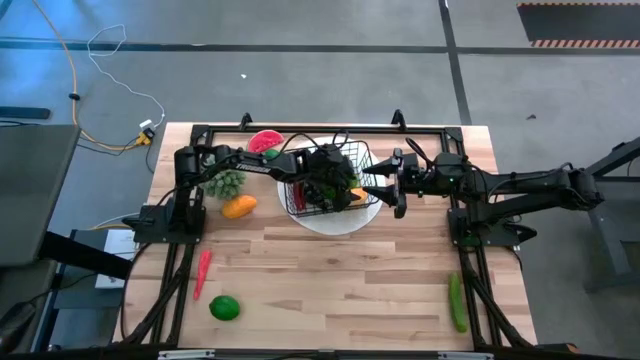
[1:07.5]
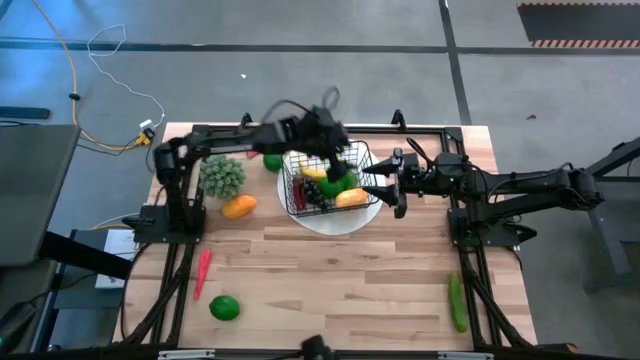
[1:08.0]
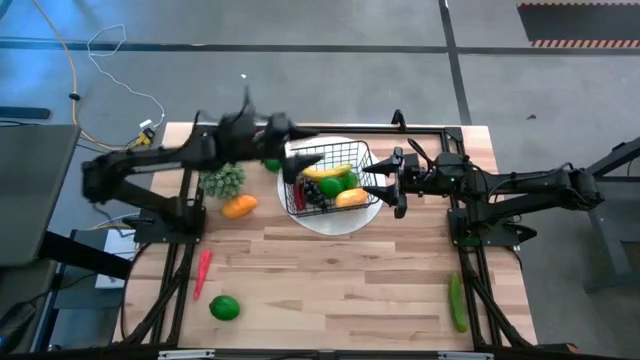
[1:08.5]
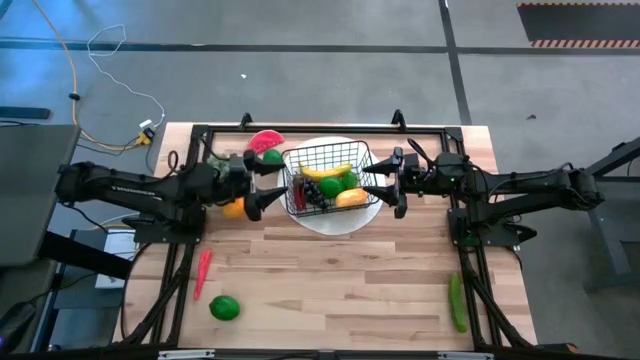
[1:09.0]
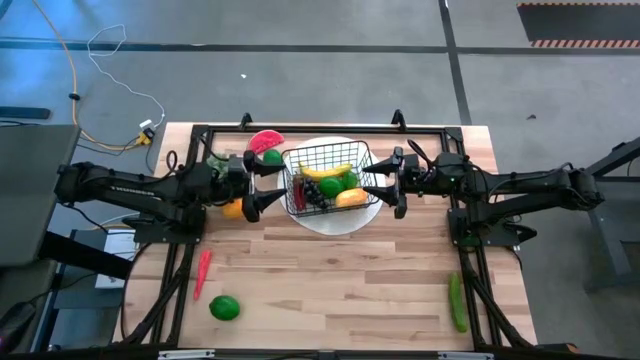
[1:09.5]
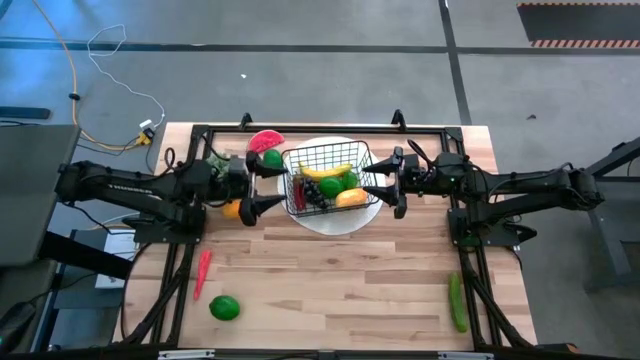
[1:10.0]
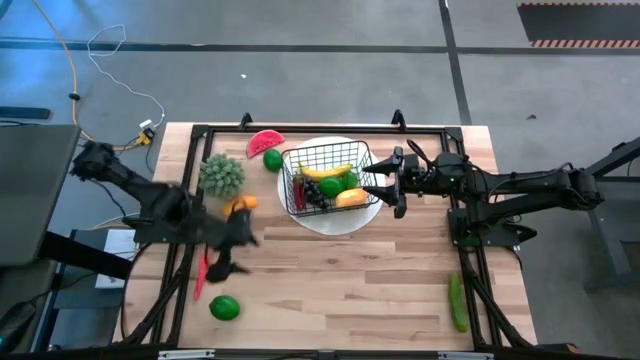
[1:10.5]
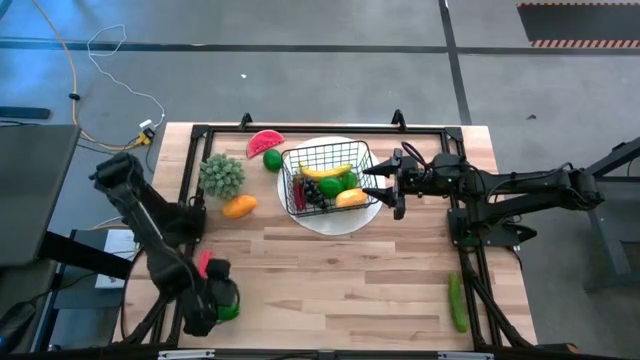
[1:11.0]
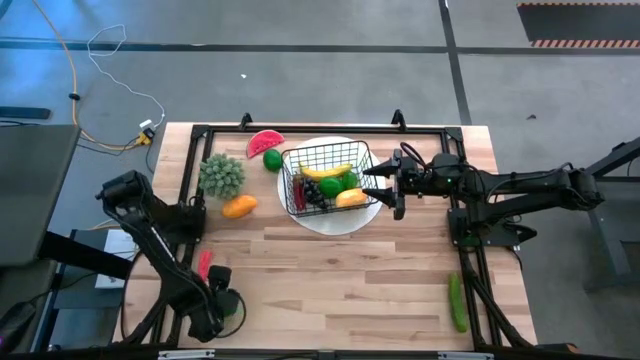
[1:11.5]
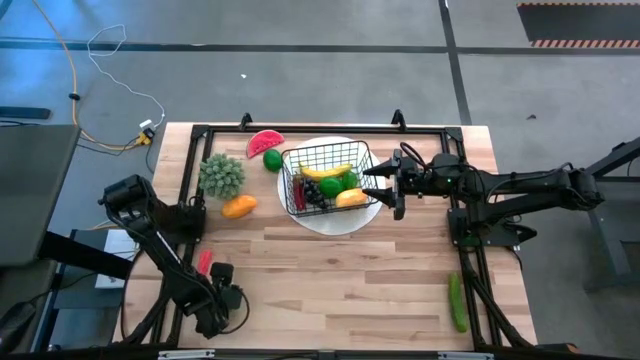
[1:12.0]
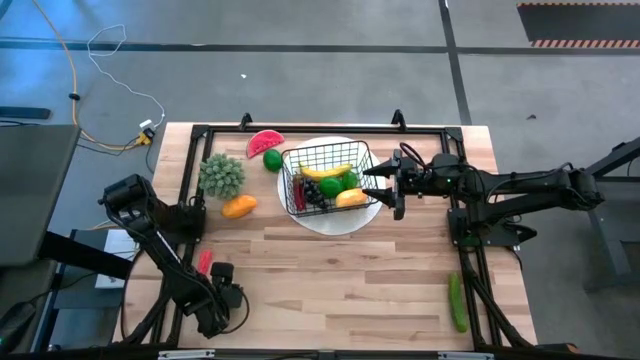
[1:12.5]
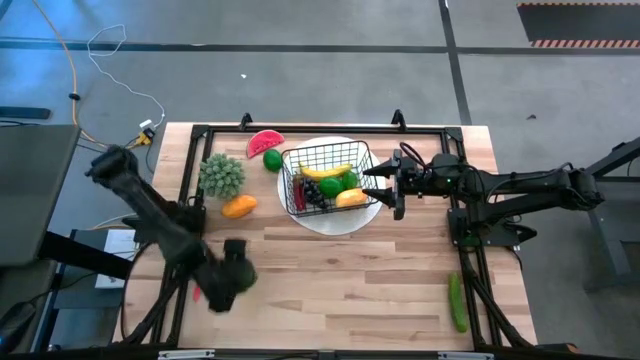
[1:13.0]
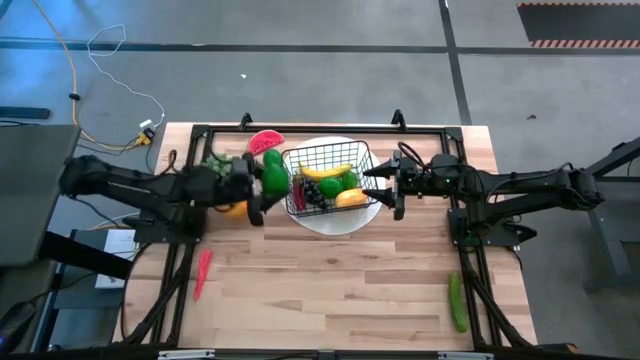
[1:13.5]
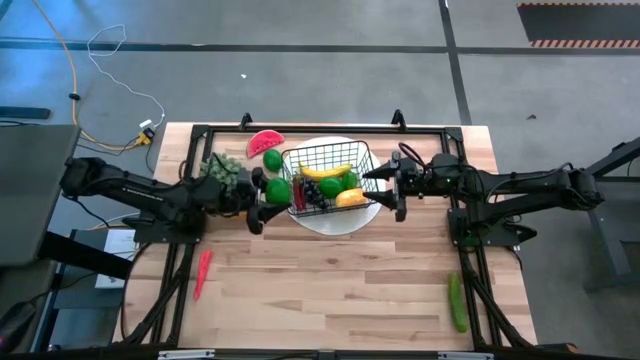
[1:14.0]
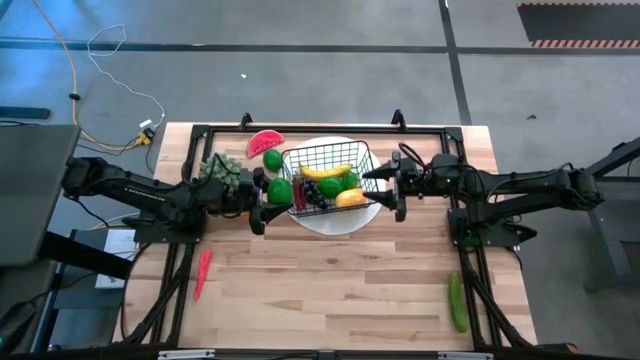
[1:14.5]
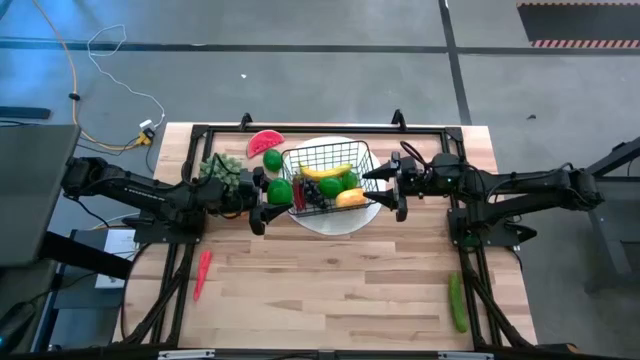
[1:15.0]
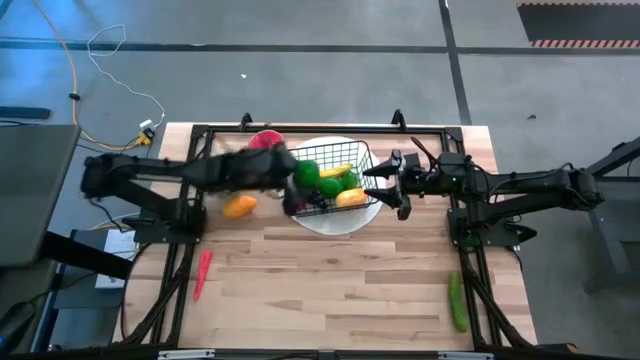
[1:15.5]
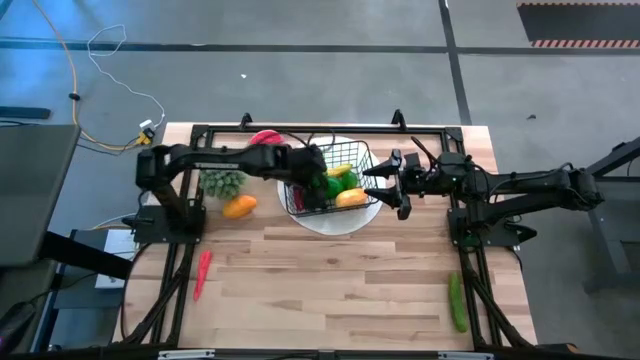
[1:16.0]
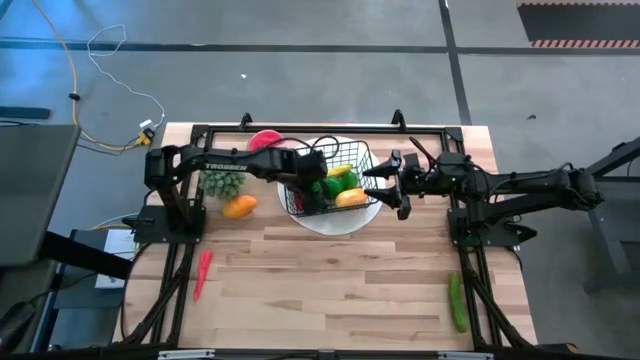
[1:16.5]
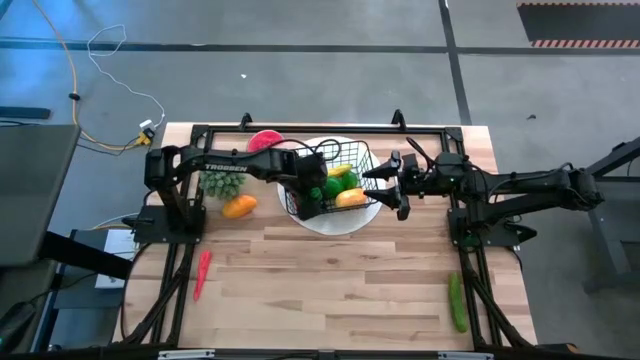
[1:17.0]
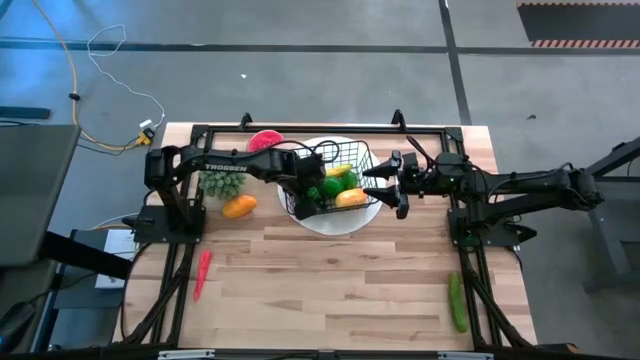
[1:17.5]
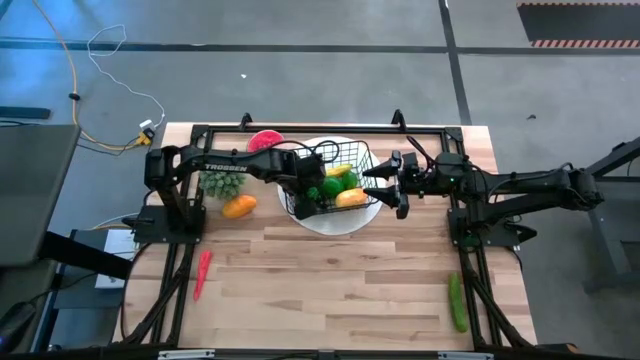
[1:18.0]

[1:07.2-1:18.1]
Task: Build produce basket
Put the green lime into the black wire basket

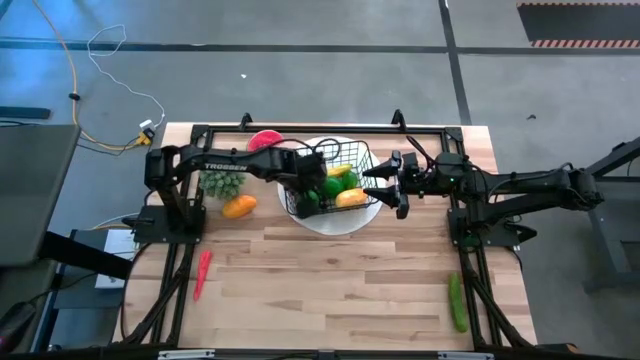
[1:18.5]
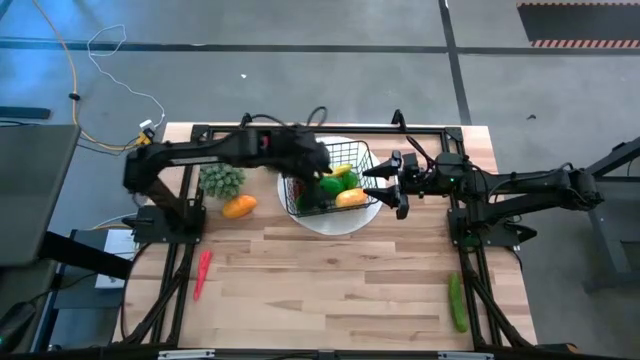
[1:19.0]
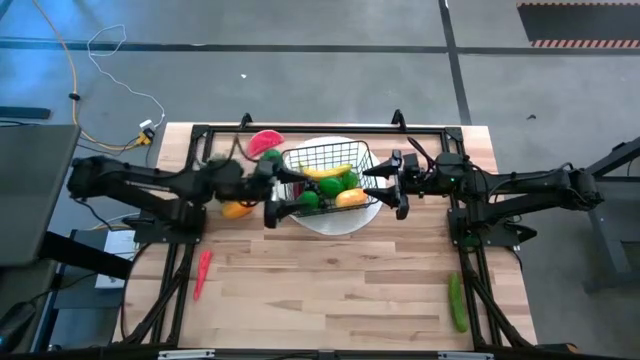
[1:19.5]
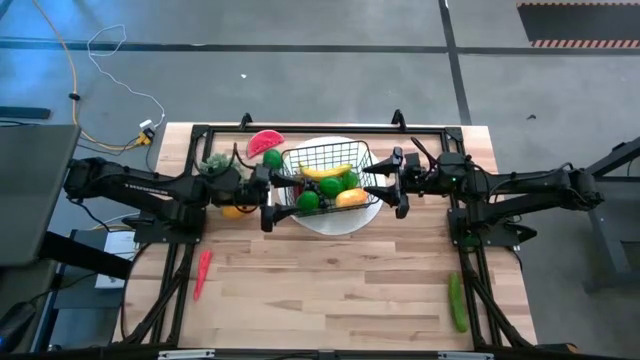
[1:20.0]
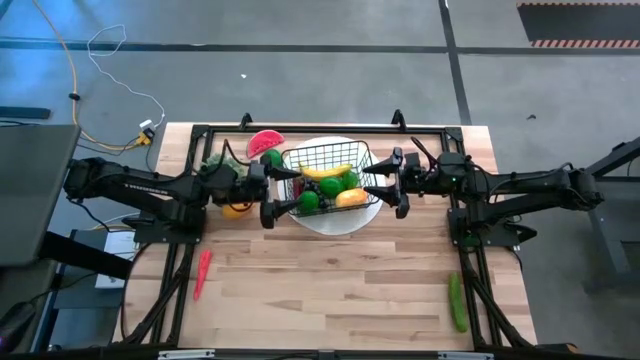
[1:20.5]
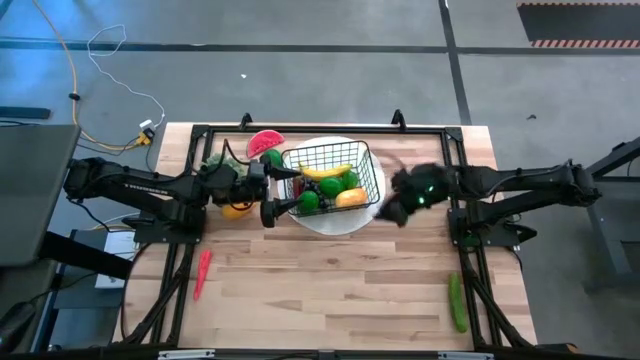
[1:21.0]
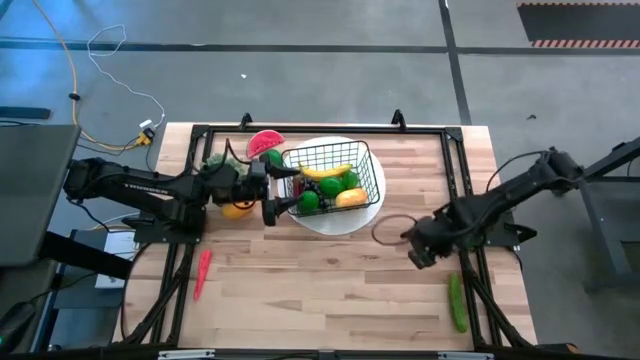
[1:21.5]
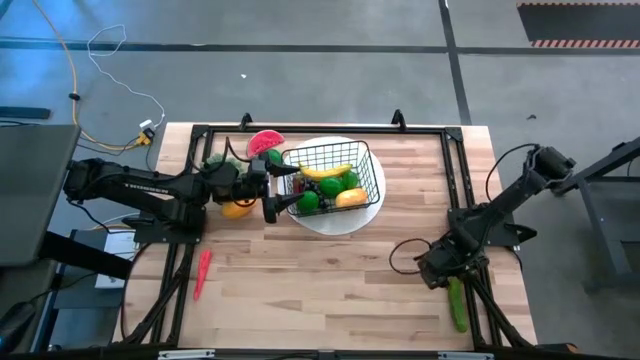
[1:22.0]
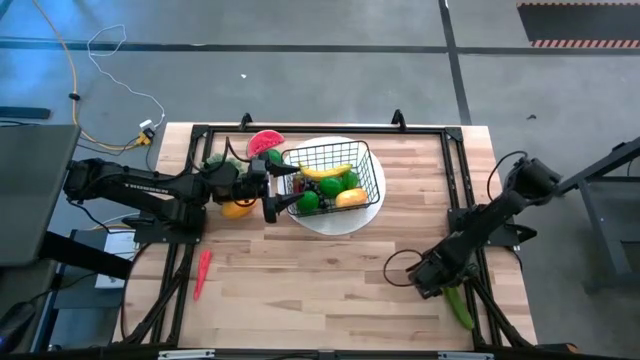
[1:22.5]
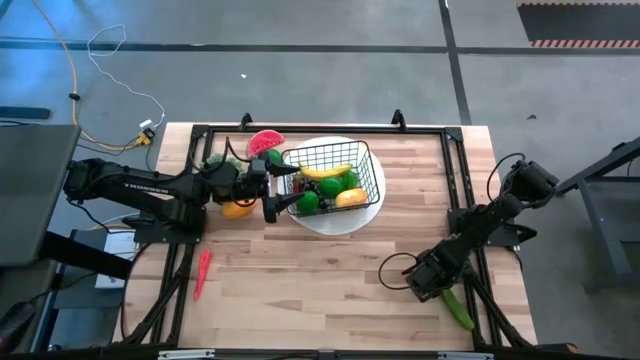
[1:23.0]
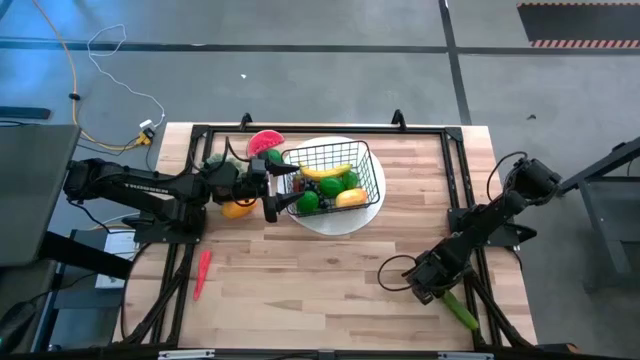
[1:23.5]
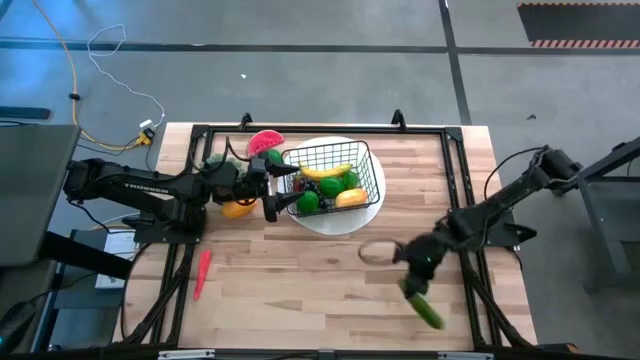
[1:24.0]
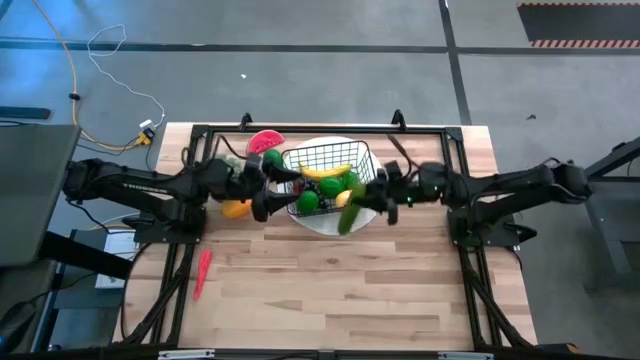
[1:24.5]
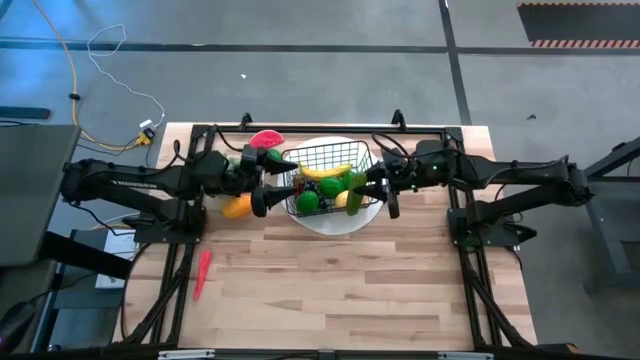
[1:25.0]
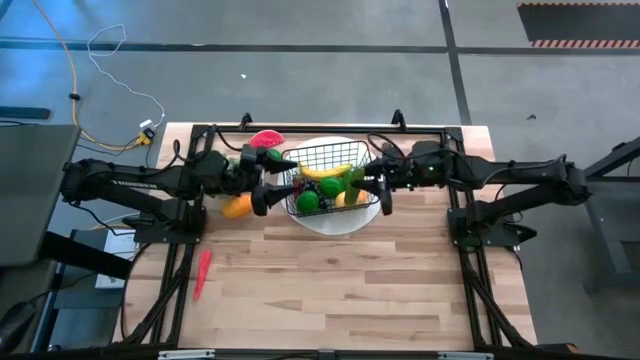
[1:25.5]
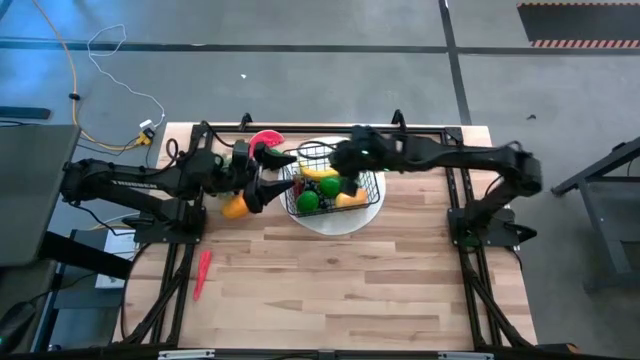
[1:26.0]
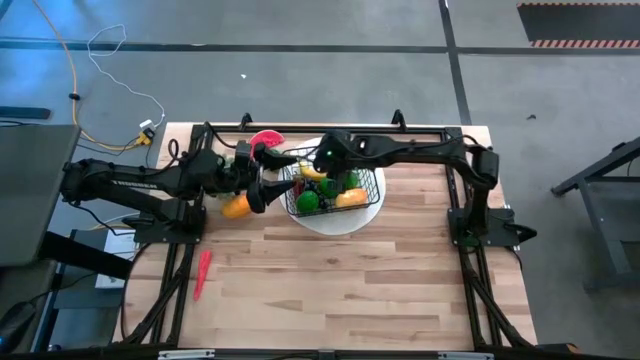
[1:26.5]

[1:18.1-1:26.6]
Put the green cucumber into the black wire basket

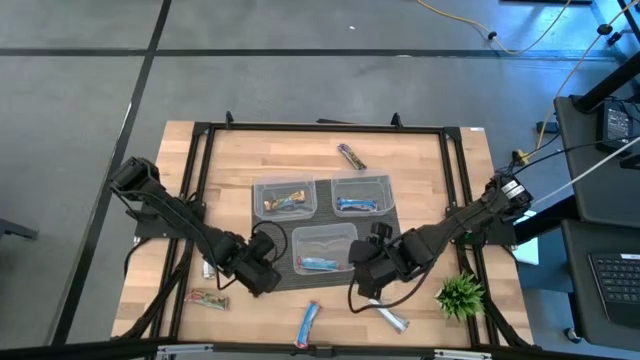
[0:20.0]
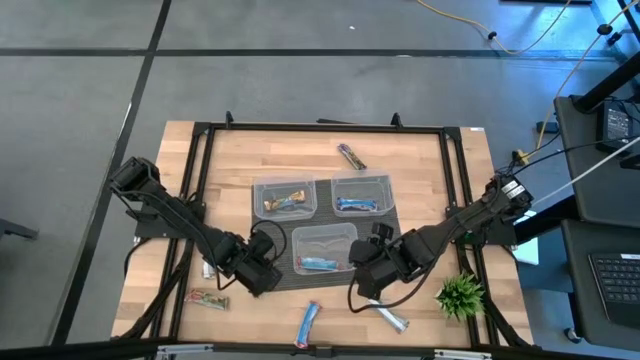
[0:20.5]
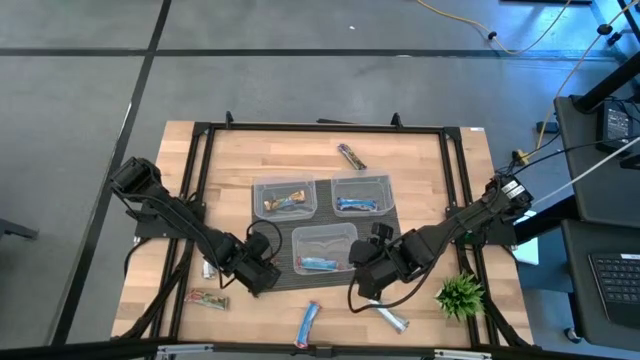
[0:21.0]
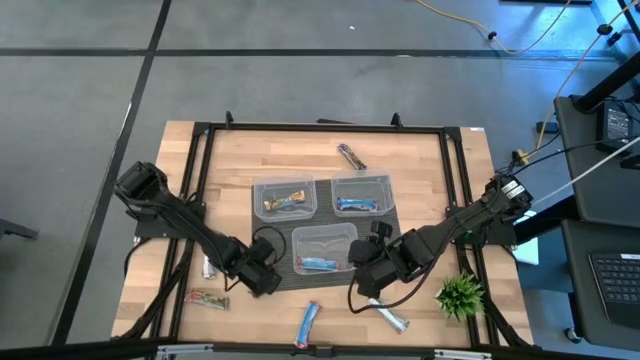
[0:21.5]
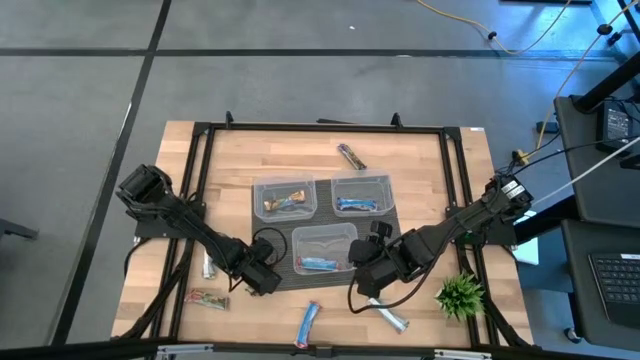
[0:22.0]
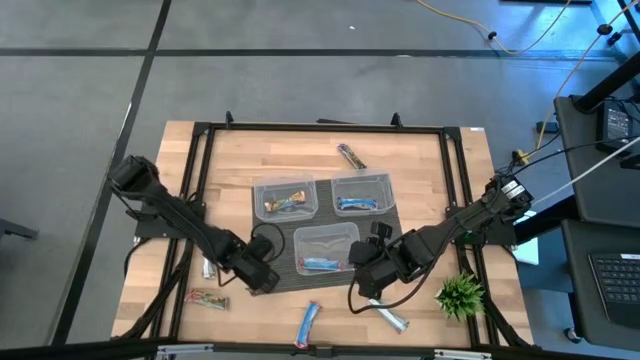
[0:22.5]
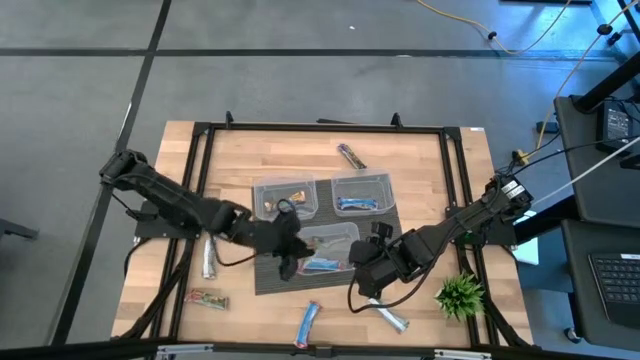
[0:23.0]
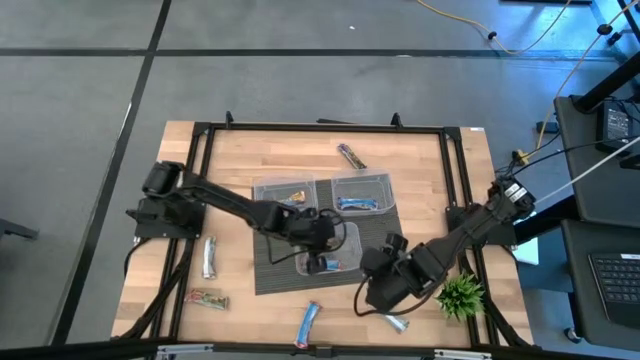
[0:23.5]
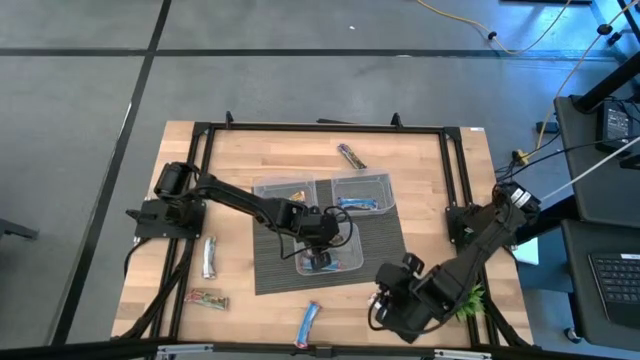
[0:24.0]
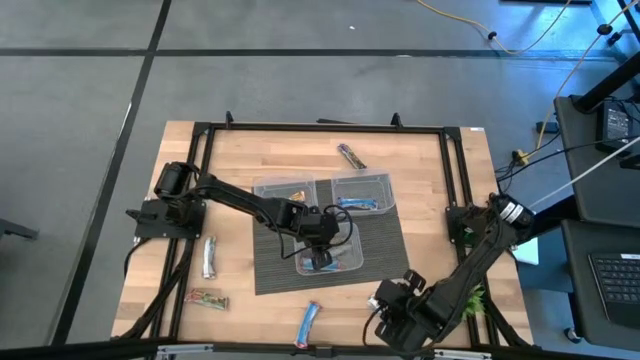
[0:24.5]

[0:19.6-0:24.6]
Task: Pick and place Granola Bars by type
Put the red granola bar into the bottom transparent bin
